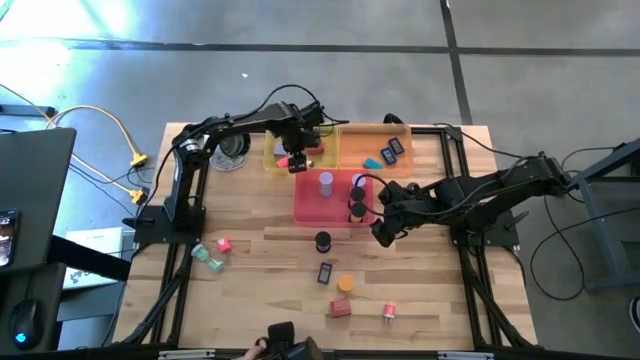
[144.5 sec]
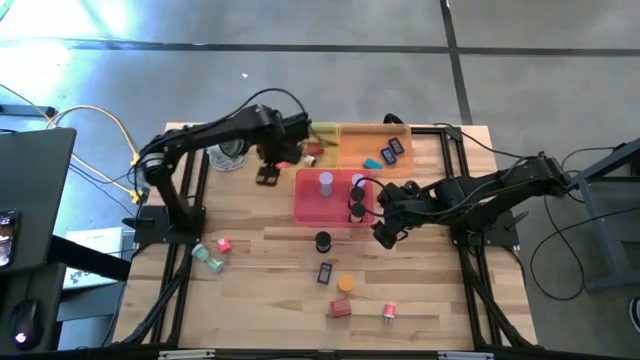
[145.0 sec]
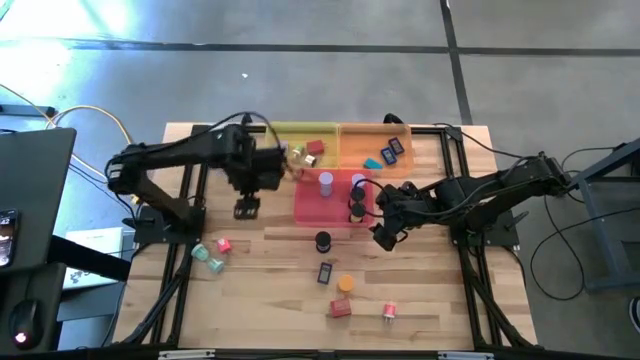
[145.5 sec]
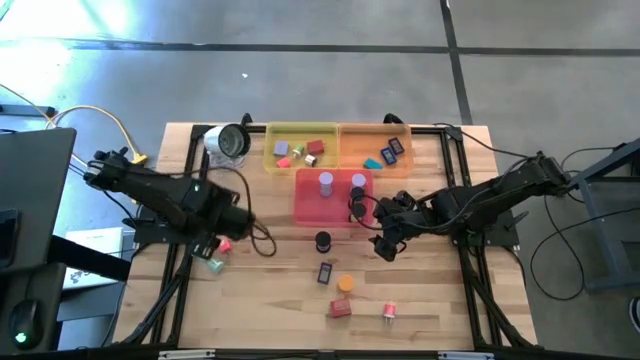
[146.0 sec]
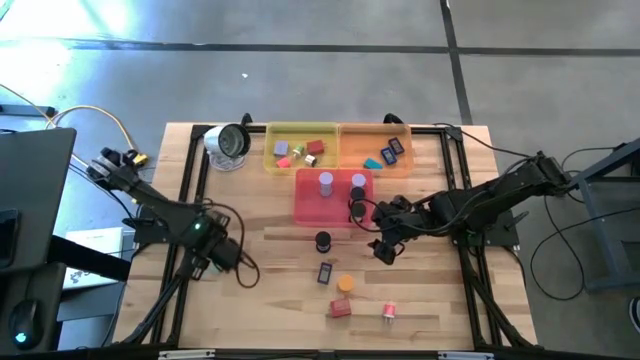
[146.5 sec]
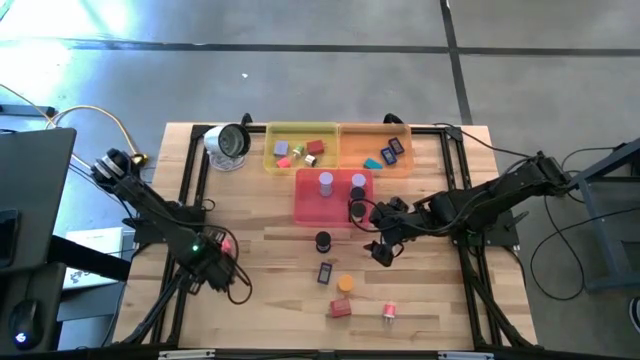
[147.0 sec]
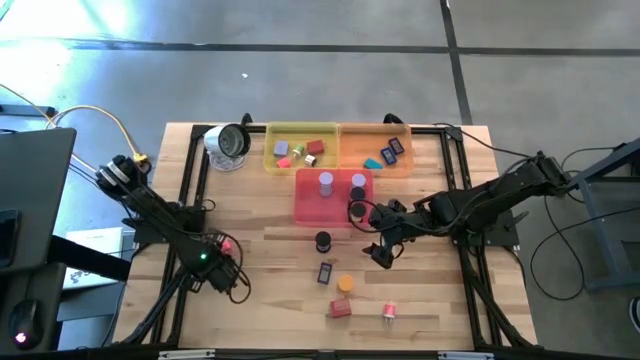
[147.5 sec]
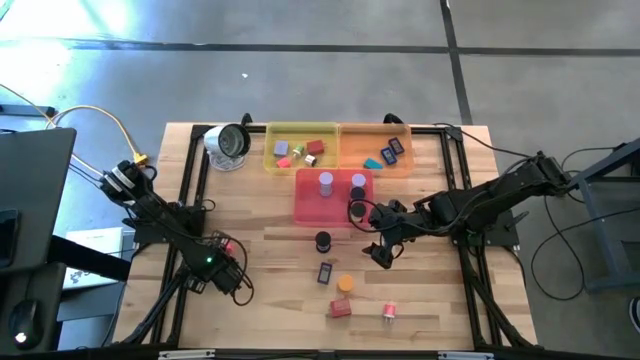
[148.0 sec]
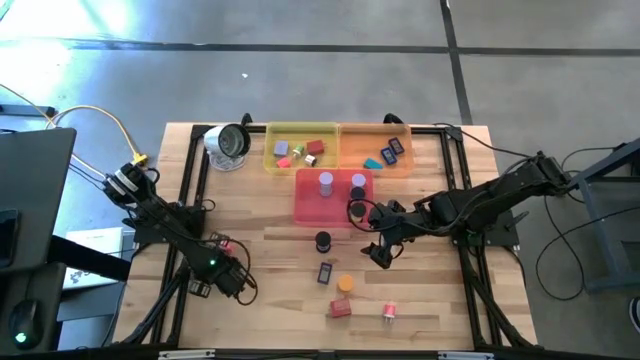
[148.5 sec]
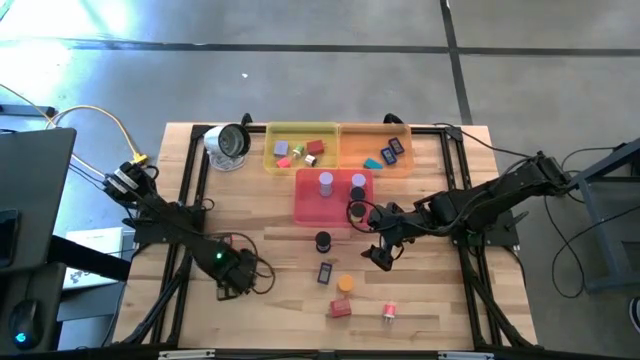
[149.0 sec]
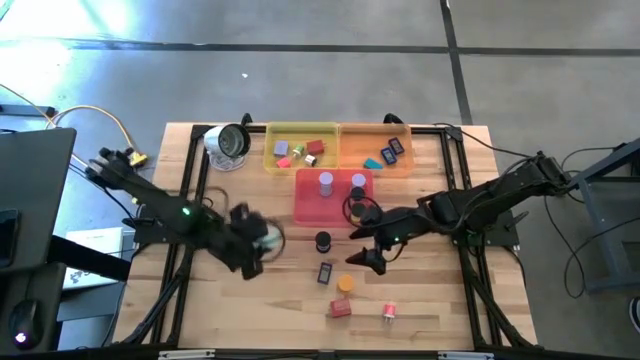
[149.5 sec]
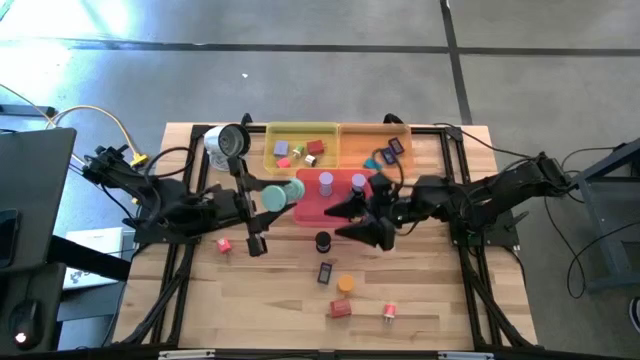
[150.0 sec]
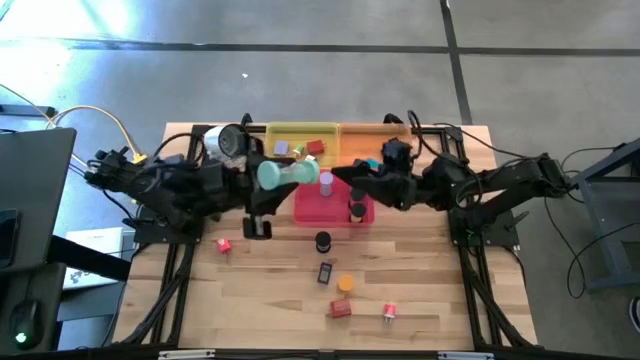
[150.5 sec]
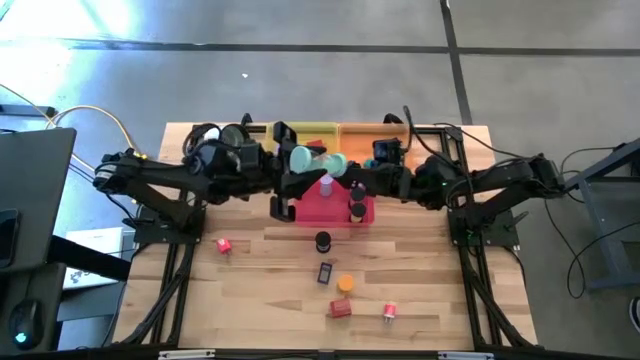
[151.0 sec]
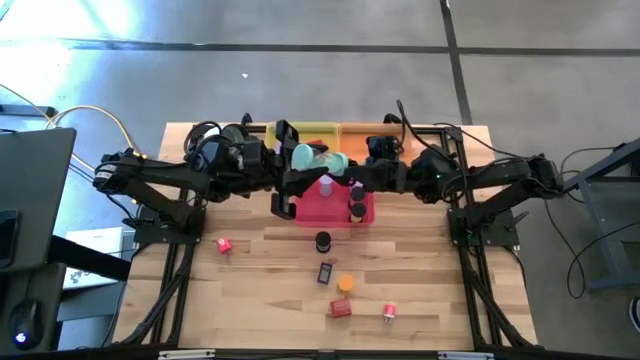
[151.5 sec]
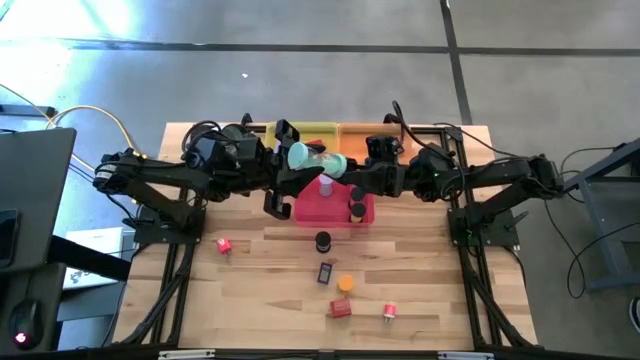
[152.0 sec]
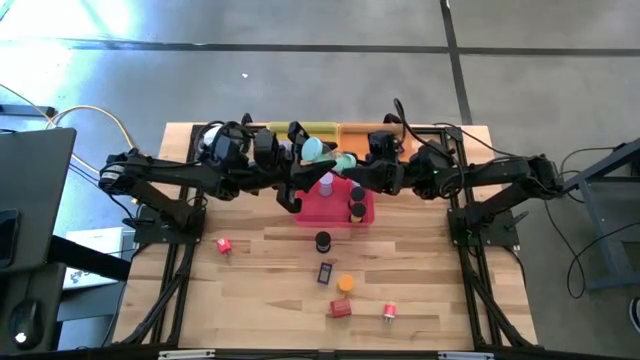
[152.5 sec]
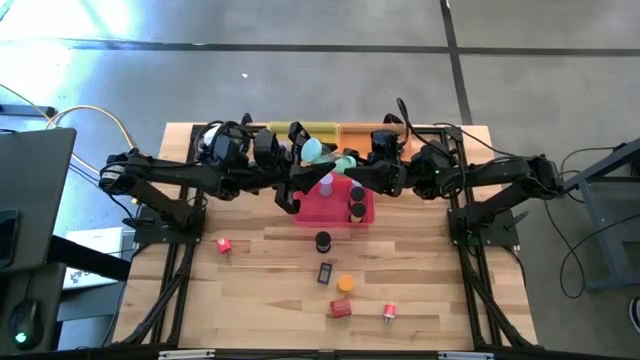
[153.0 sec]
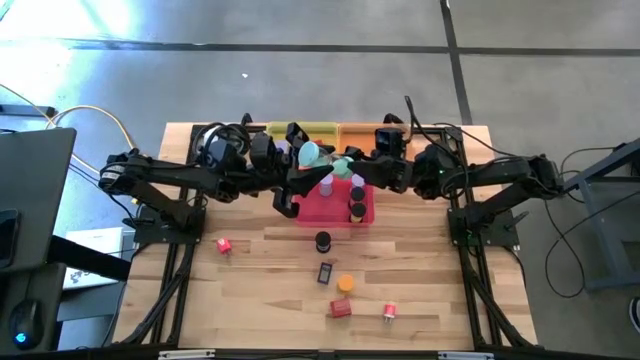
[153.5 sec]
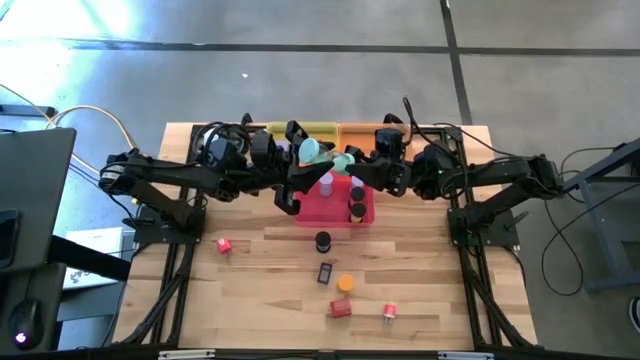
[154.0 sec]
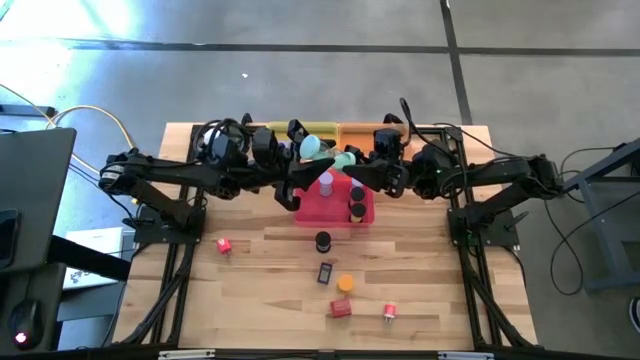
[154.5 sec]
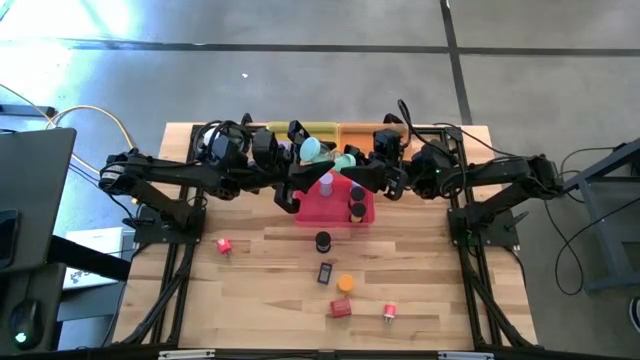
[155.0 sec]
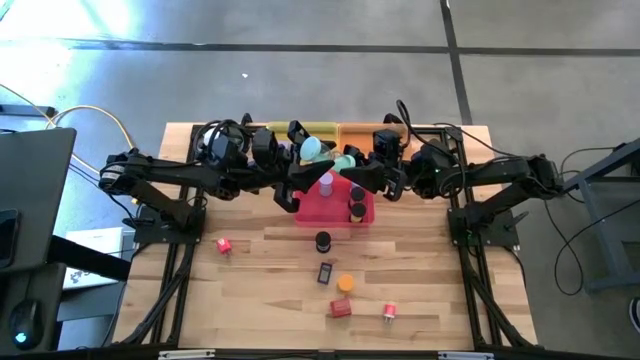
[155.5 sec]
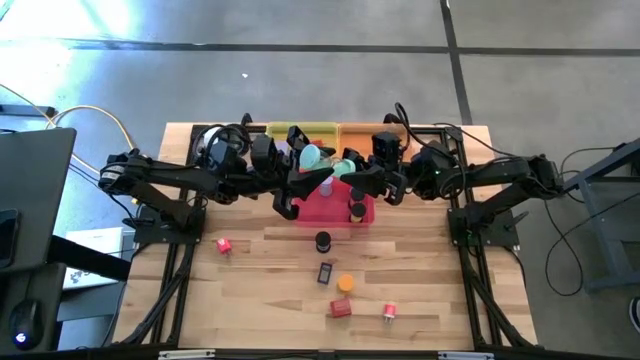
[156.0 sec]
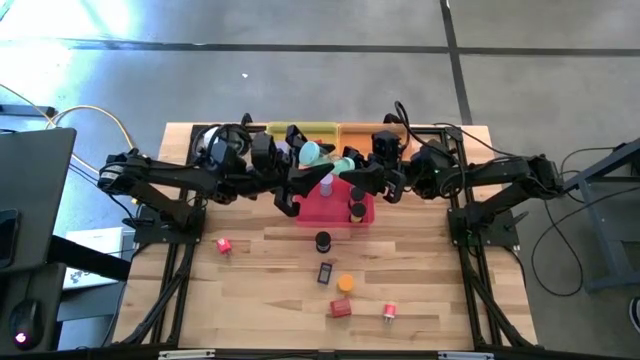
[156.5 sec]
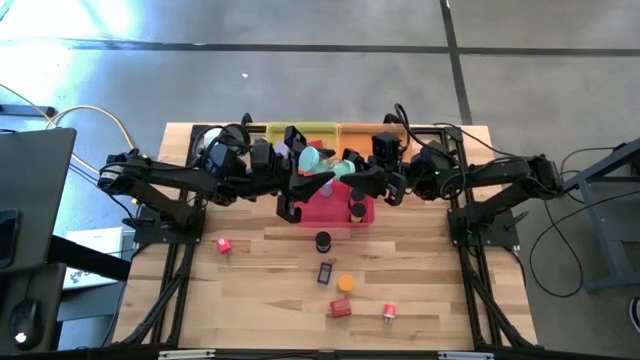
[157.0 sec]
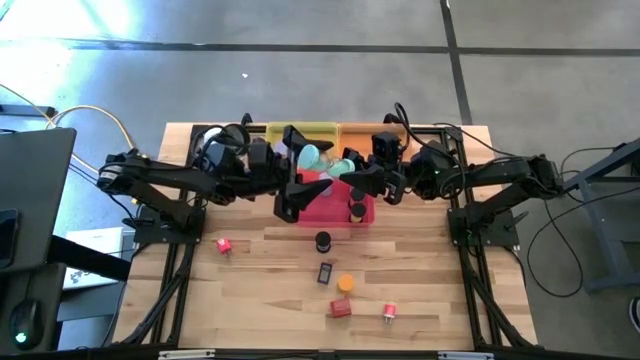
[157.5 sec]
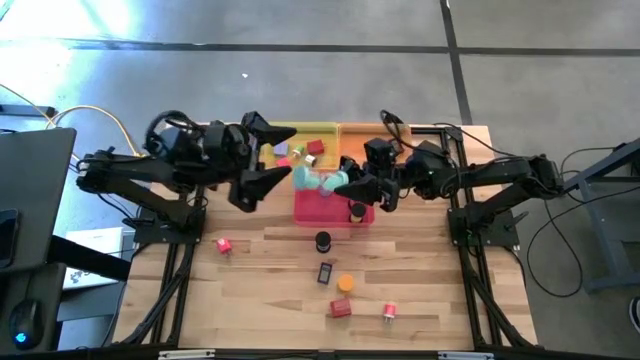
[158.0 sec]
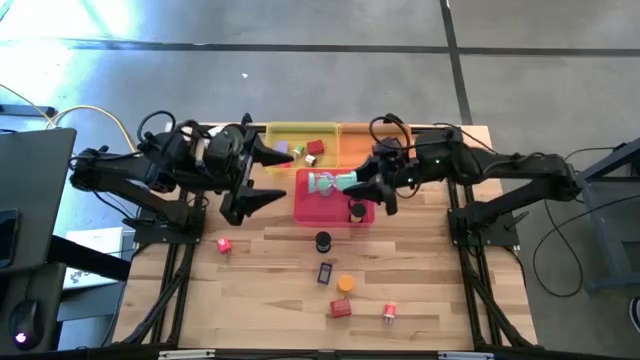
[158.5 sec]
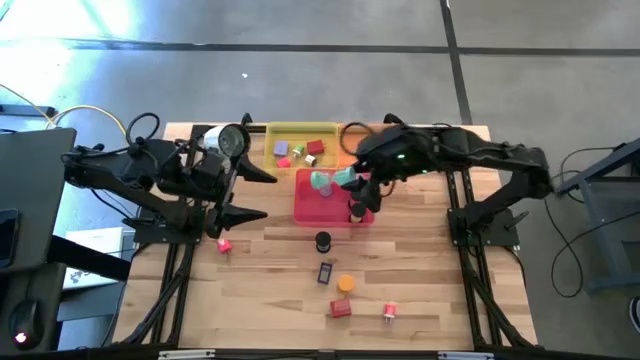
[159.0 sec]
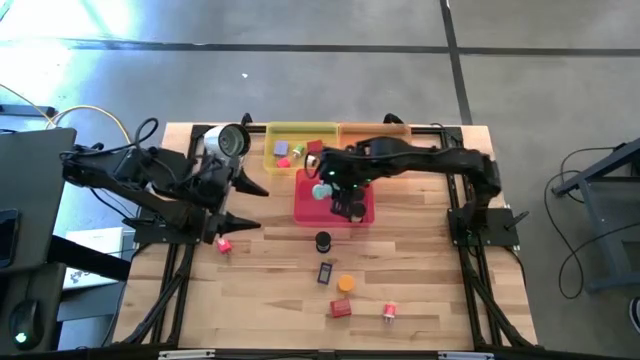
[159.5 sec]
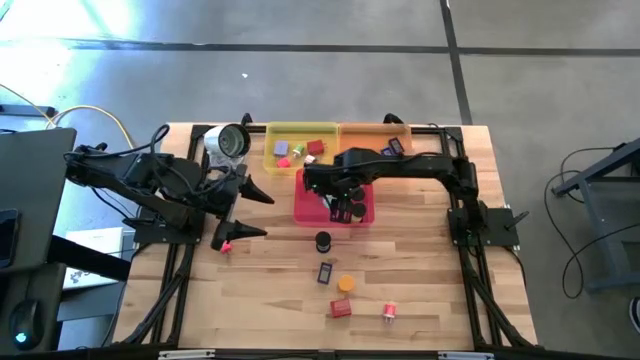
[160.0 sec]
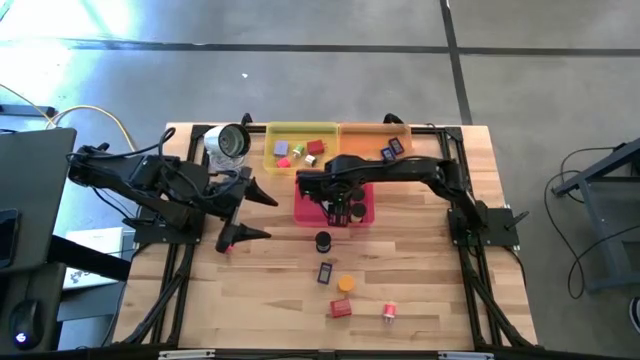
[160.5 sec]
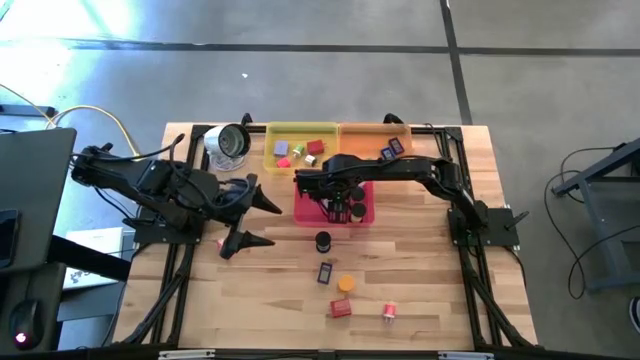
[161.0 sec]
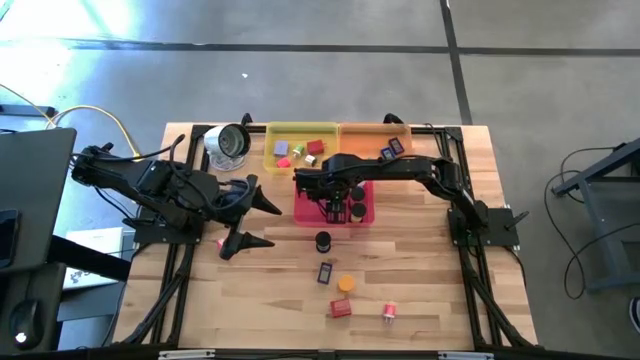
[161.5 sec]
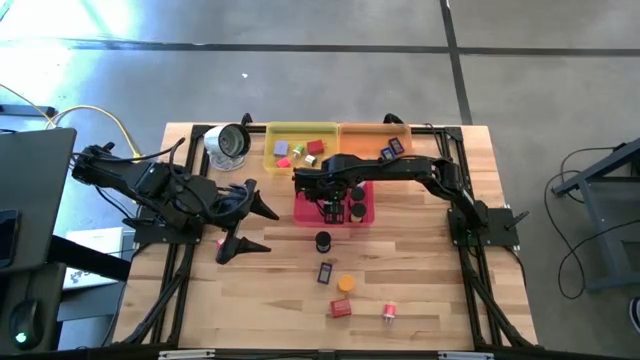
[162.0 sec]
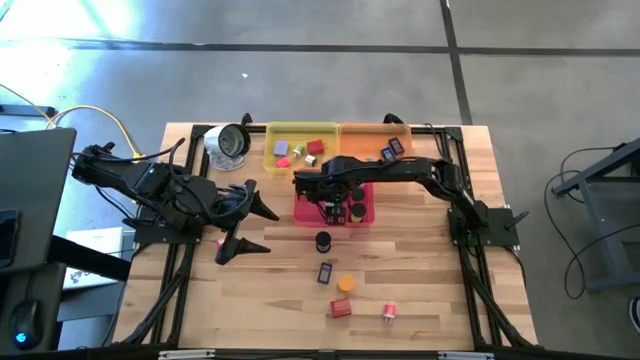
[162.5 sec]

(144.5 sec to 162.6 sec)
Task: Pick & Place Office items
Put the blue hourglass into the red bin

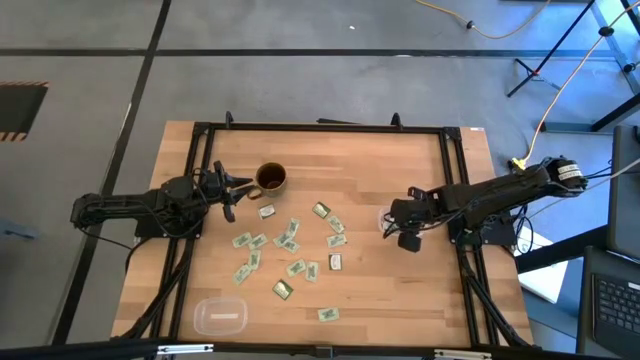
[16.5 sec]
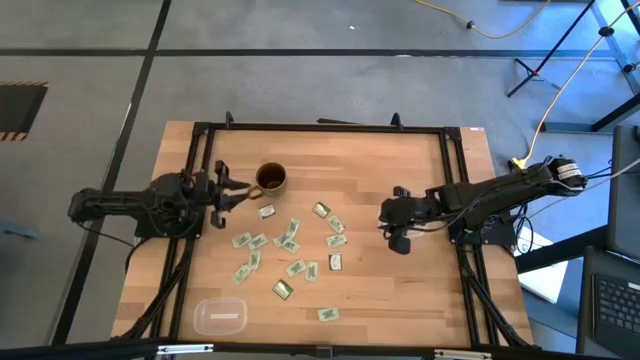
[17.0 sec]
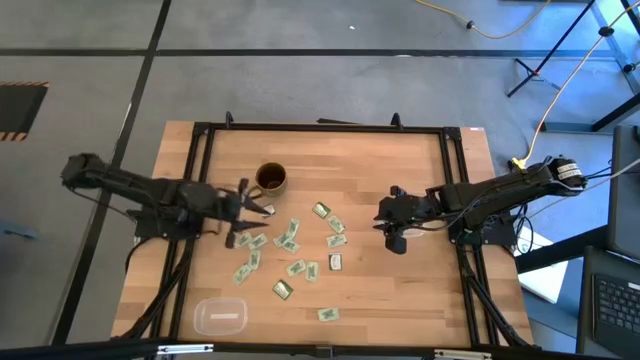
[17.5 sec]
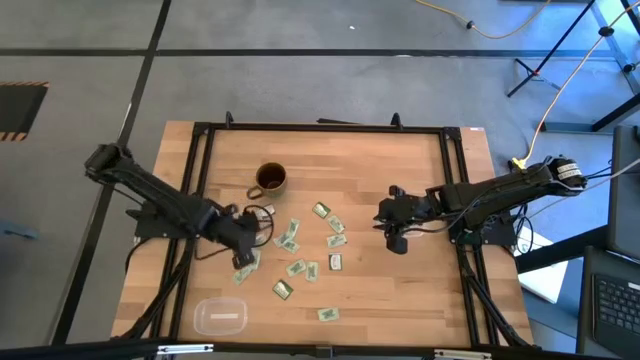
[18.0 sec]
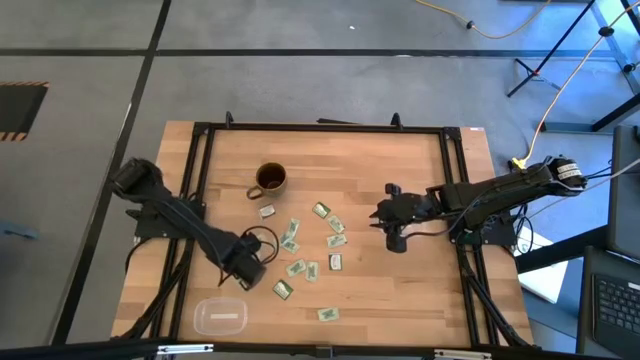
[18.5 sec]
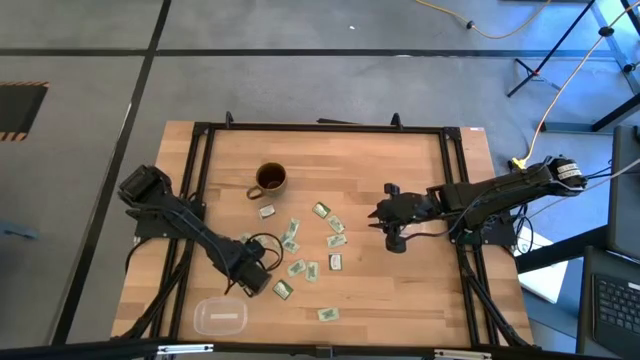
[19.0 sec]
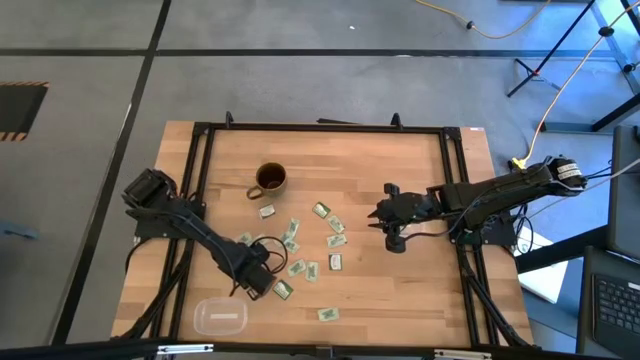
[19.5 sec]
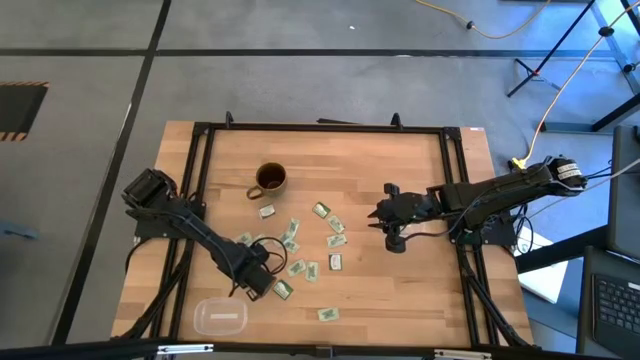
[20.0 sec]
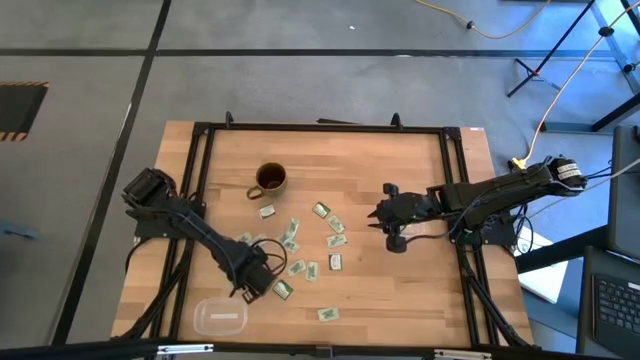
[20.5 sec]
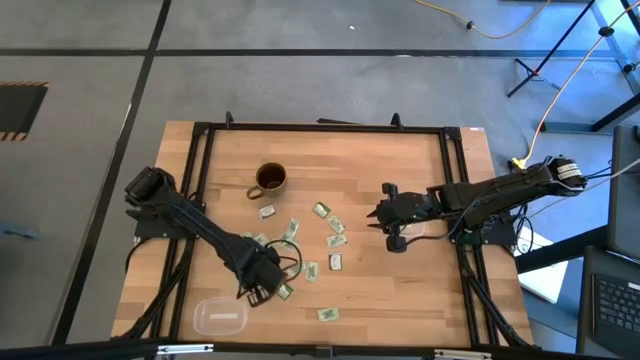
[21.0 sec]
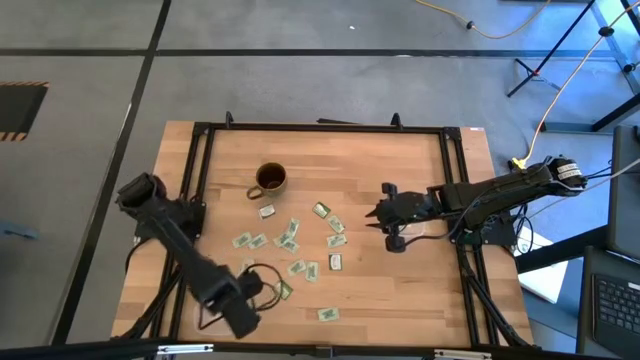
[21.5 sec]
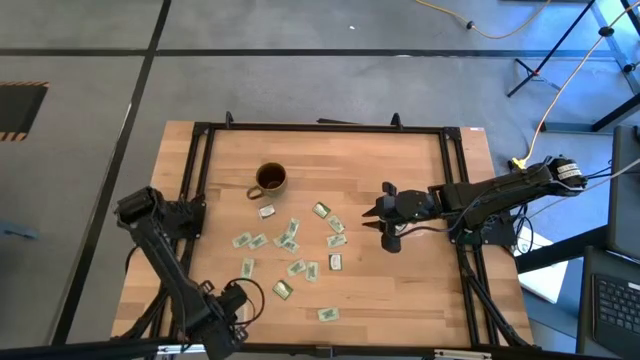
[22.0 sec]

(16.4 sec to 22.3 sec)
Task: Pick and place Stevia / Truvia into bins
Put the stevia packet into the bottom transparent container
